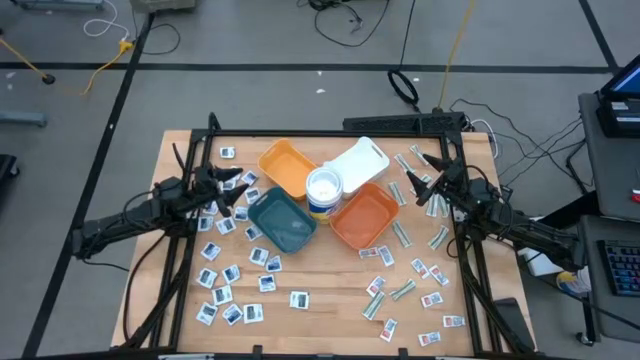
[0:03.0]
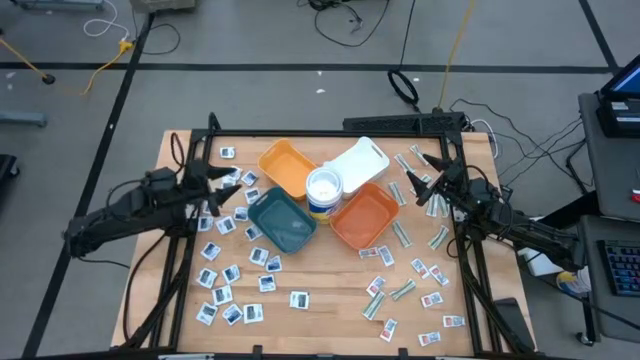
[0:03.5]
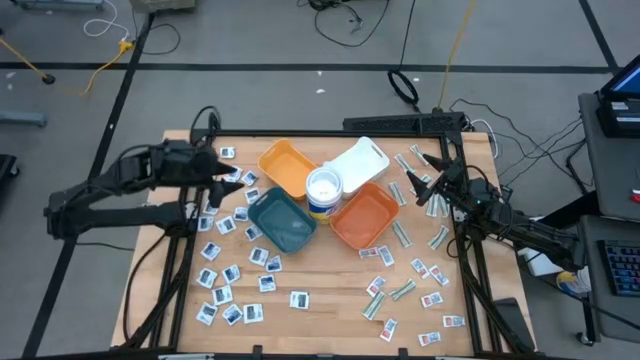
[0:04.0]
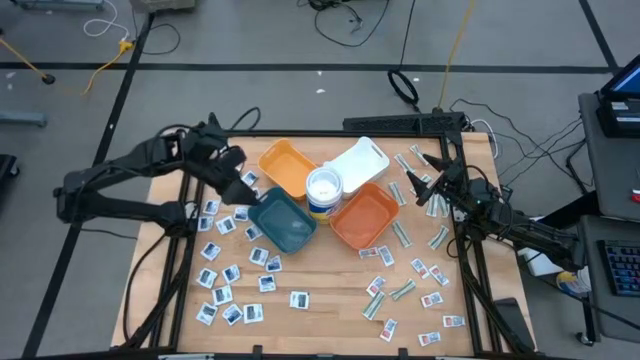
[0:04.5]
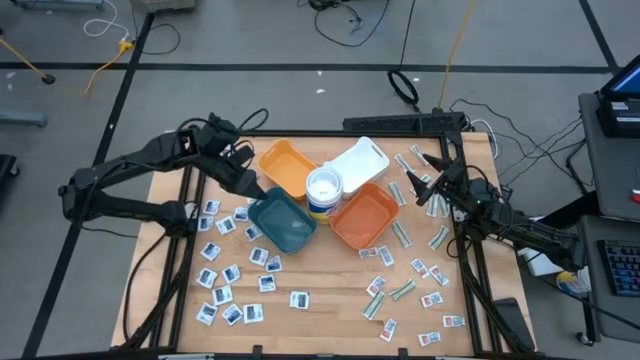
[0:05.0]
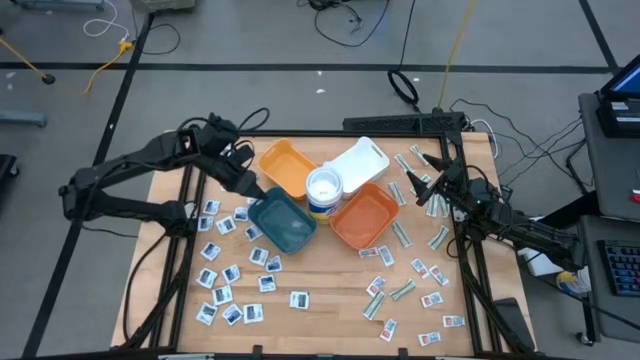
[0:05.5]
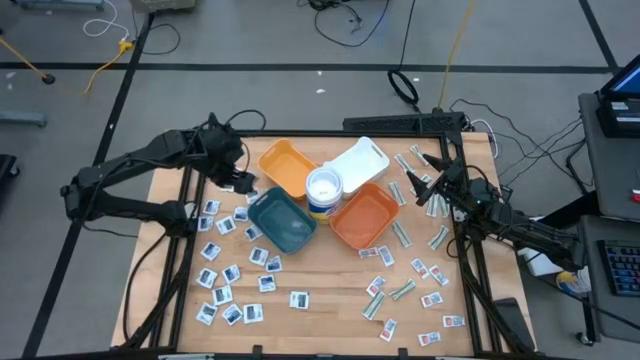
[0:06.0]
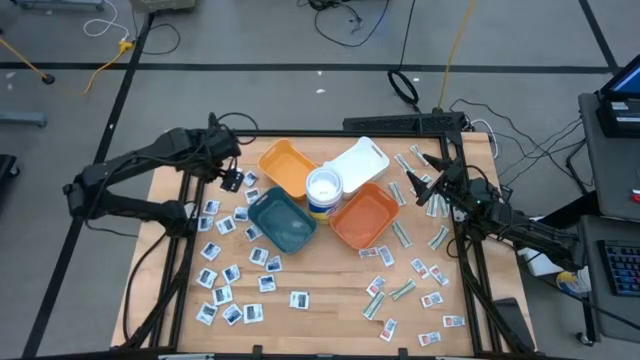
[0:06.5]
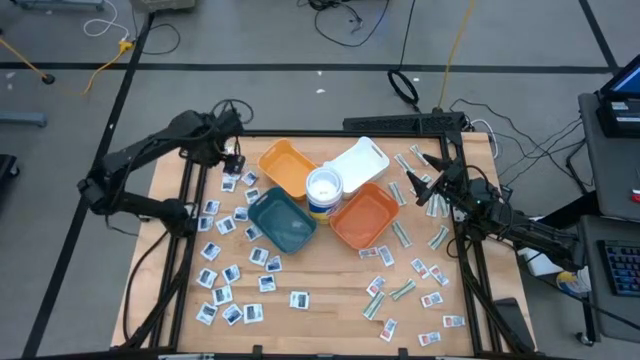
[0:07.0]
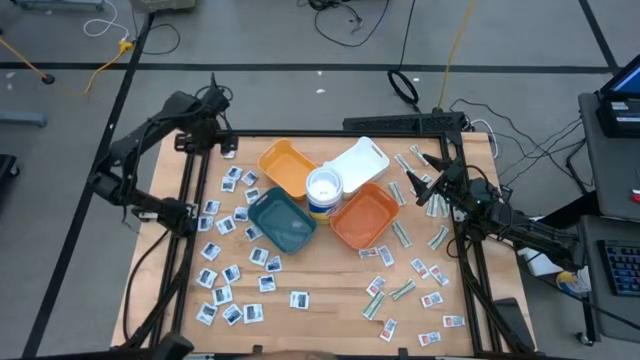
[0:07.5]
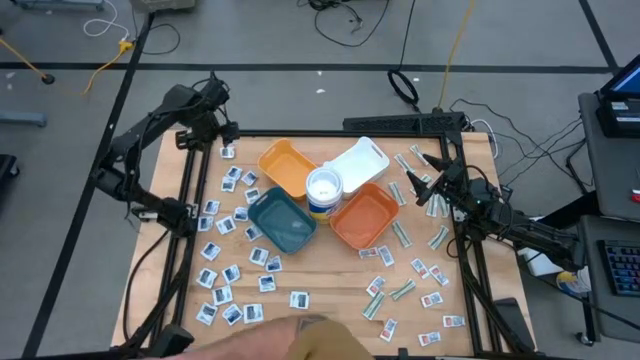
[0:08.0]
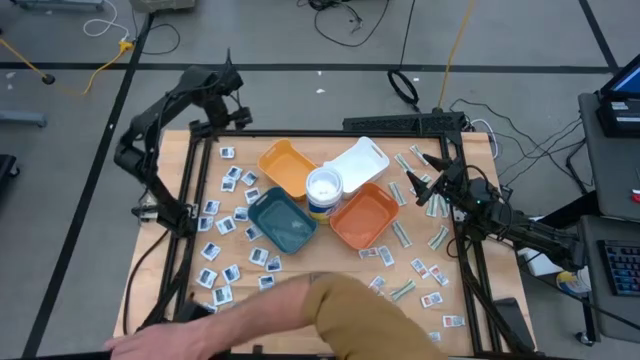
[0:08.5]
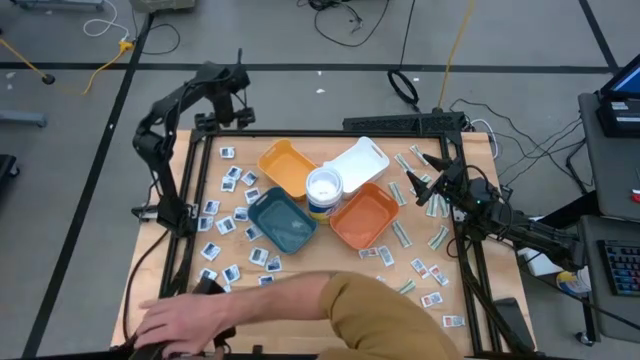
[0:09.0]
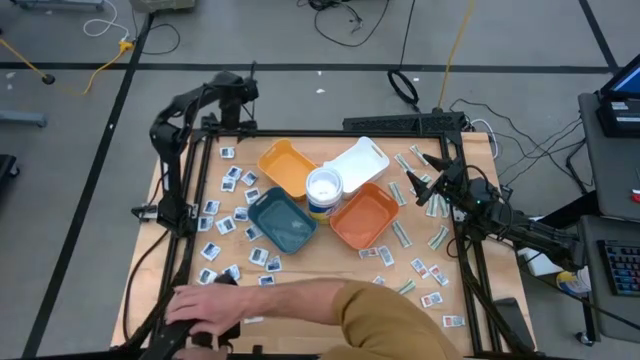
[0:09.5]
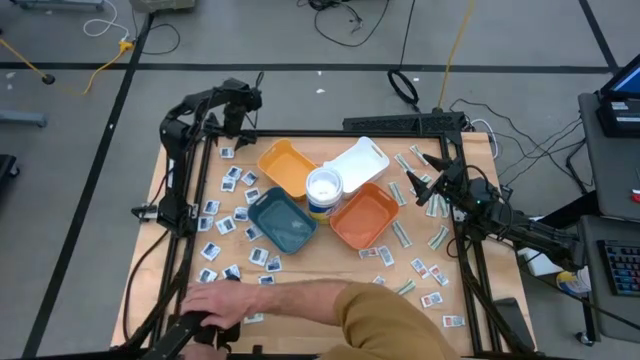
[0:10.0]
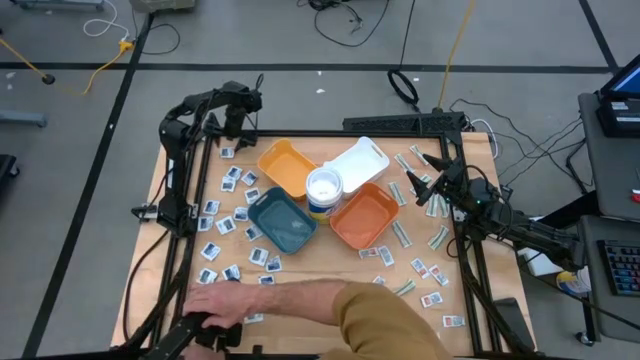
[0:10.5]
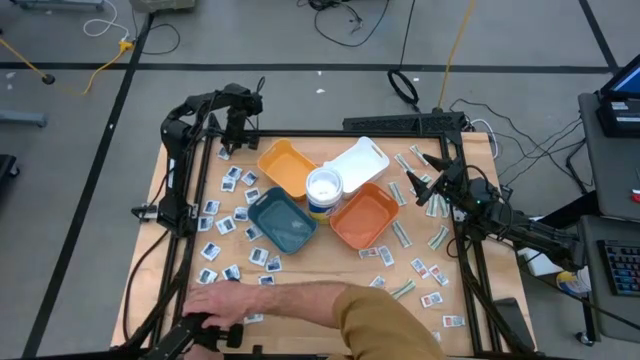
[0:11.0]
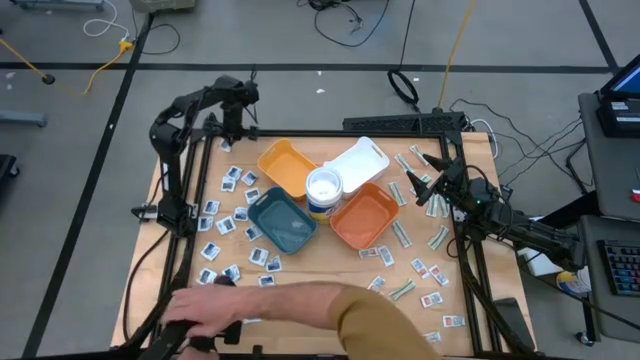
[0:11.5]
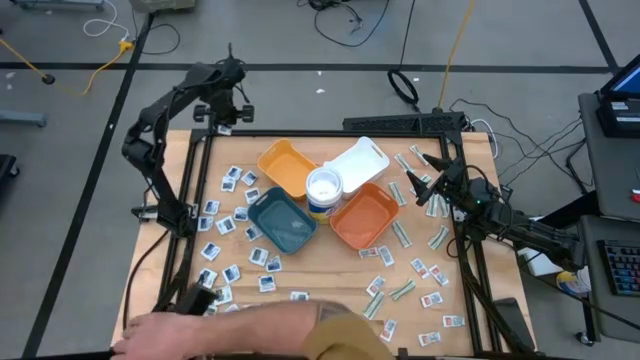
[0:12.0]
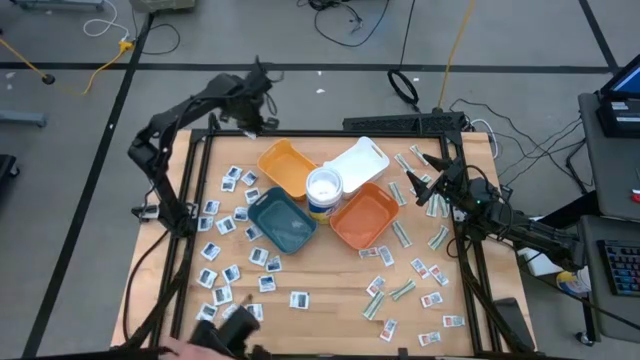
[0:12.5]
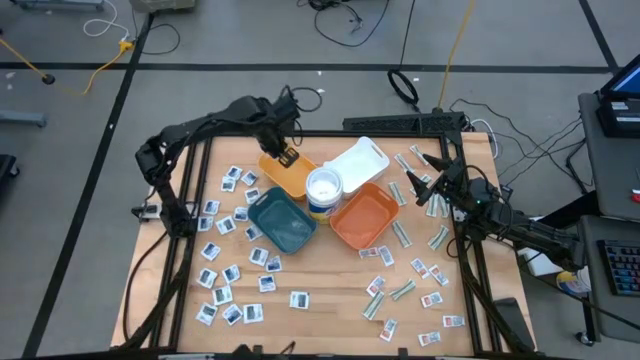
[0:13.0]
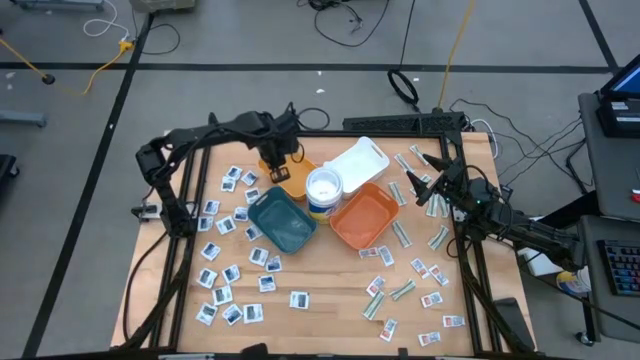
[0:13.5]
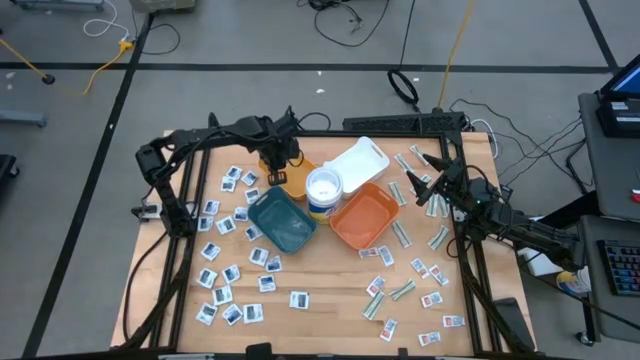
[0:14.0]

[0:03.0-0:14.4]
Task: Pick & Place First Aid Supplies
Put the black pad into the yellow bin

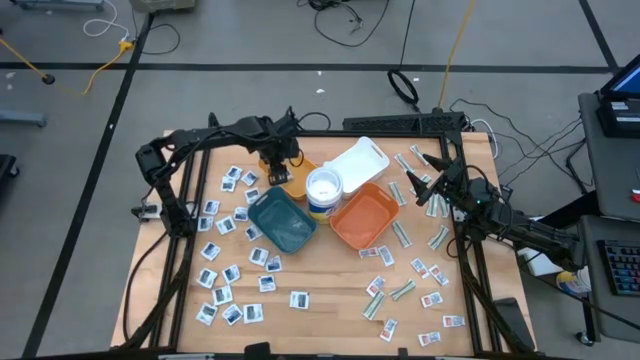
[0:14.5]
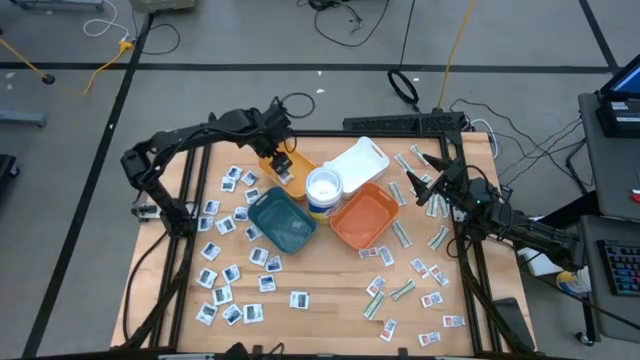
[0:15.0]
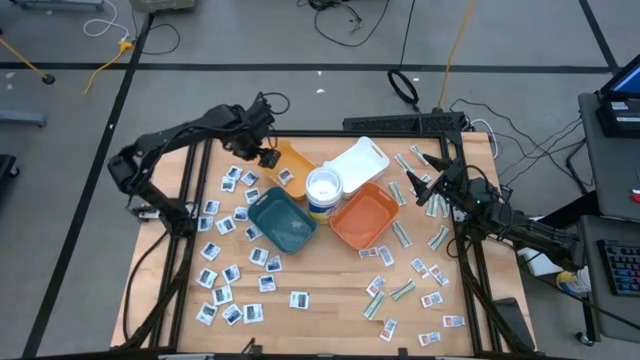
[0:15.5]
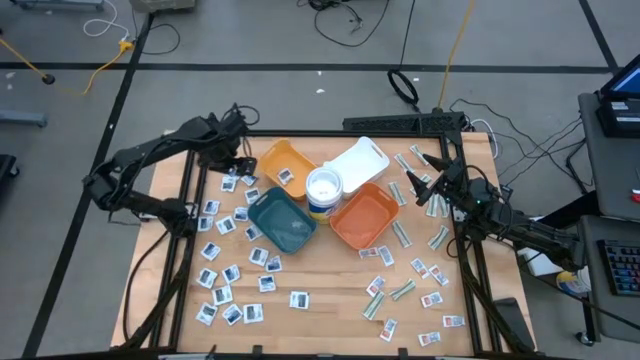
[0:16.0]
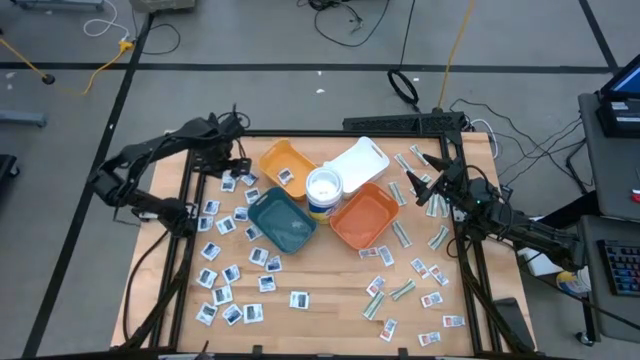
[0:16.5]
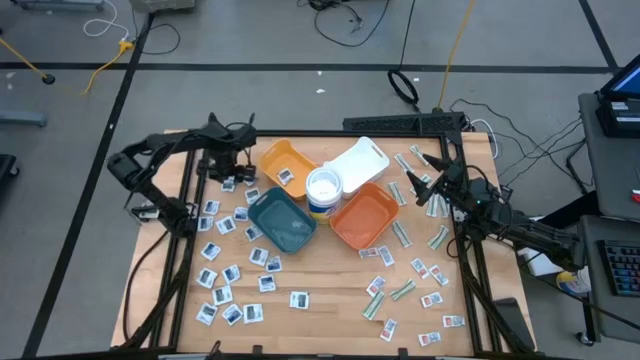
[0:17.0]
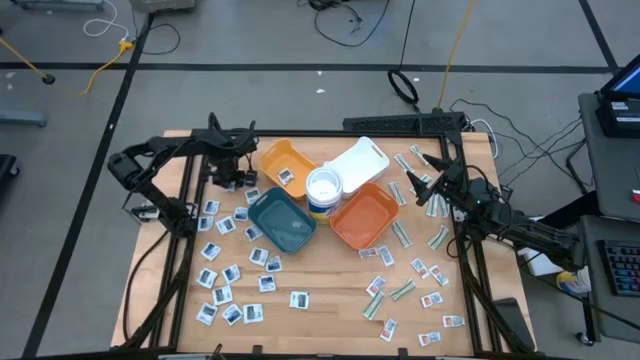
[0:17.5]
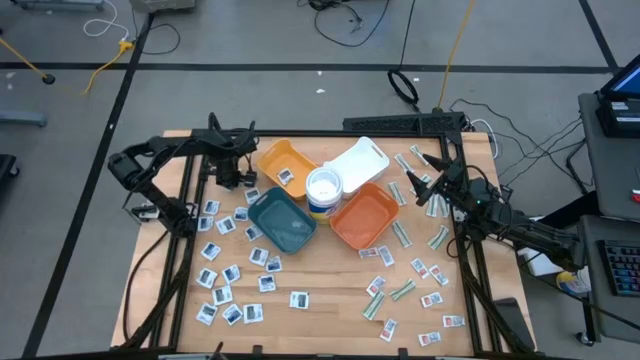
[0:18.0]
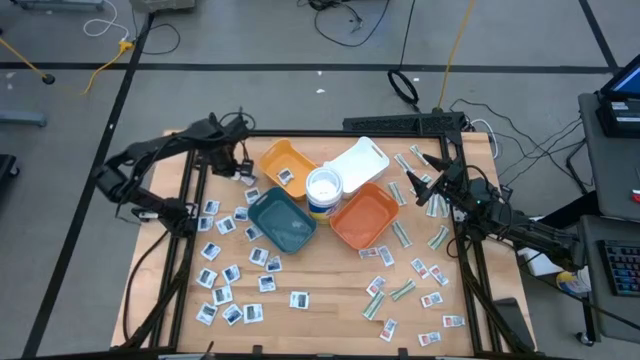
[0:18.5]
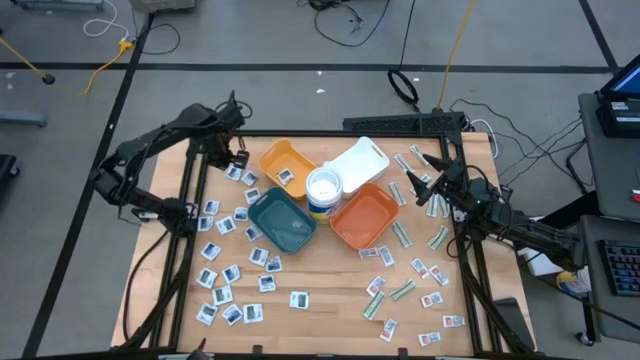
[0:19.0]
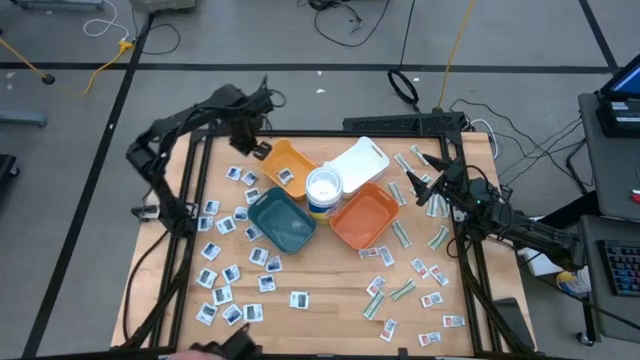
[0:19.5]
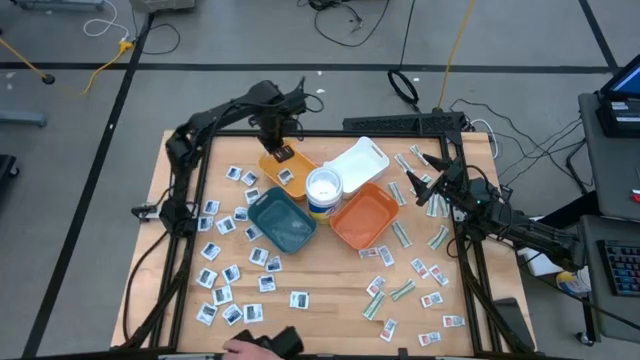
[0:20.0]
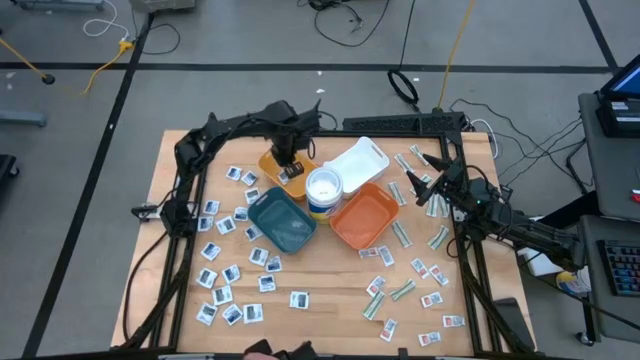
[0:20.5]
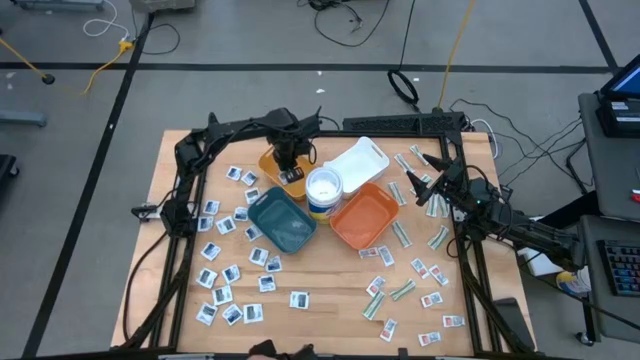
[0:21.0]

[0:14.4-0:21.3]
Put the black pad into the yellow bin

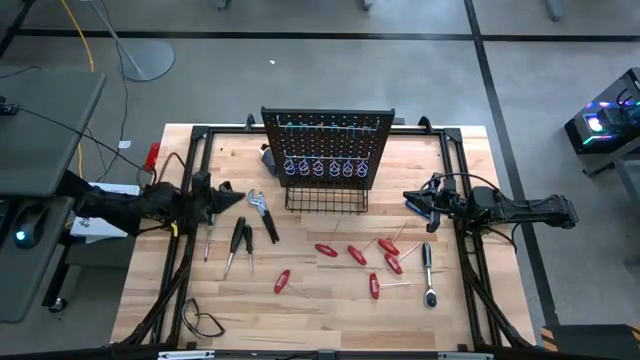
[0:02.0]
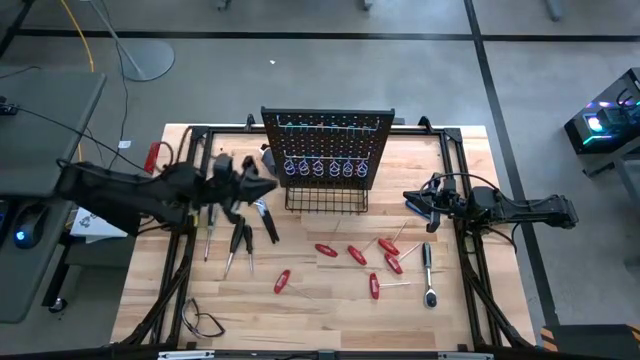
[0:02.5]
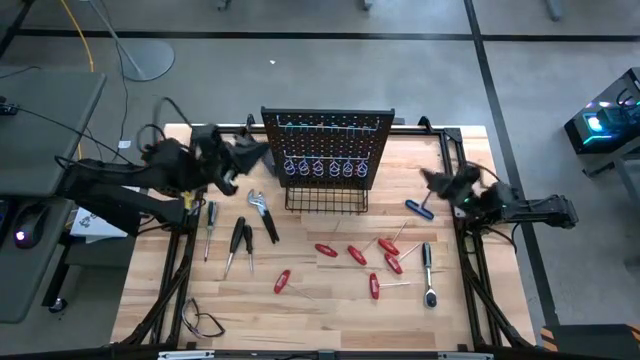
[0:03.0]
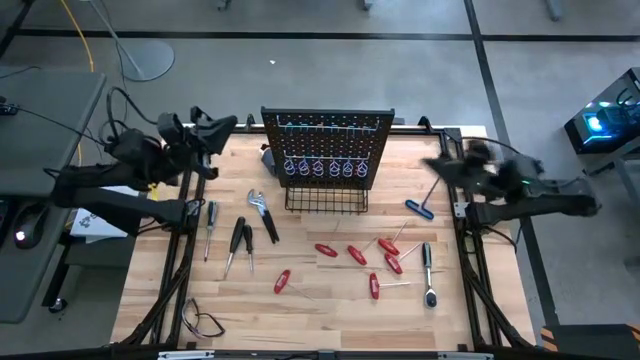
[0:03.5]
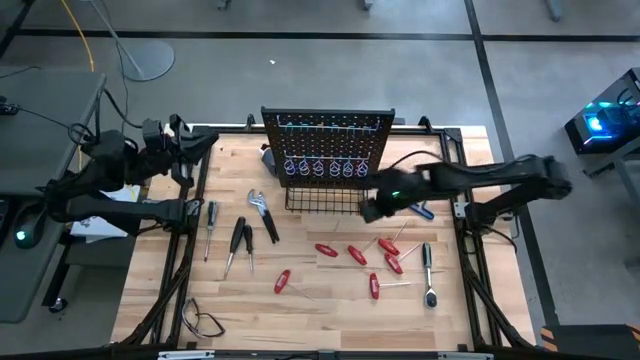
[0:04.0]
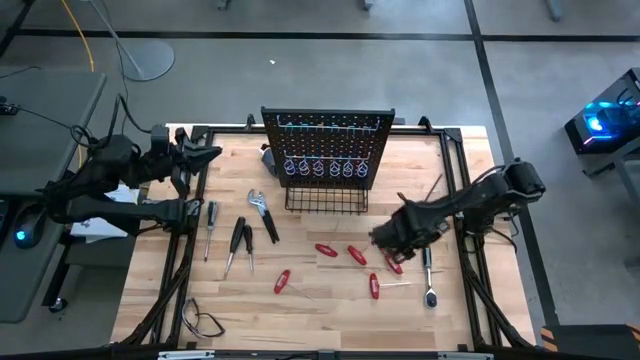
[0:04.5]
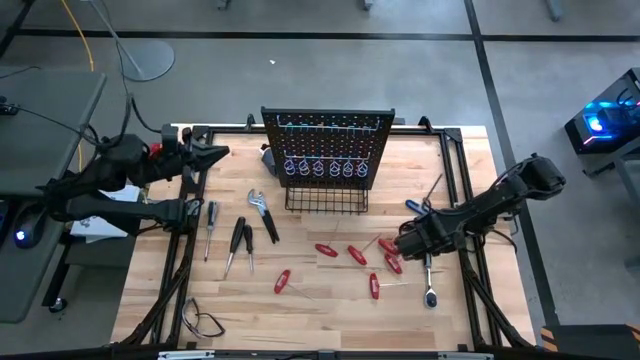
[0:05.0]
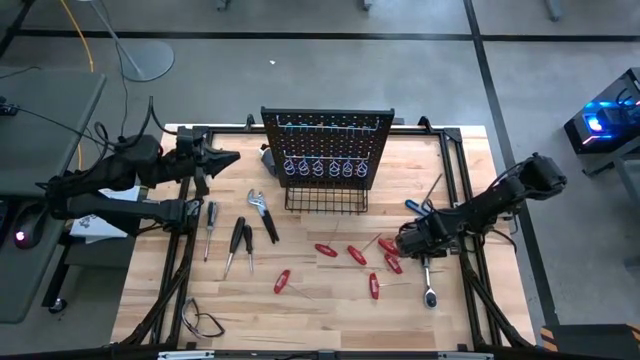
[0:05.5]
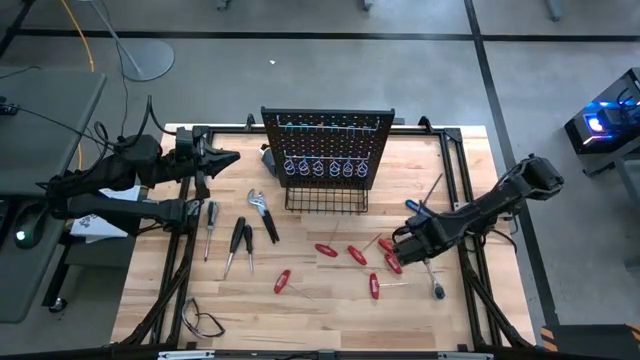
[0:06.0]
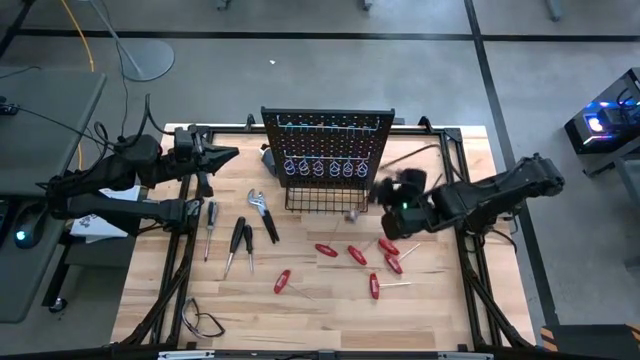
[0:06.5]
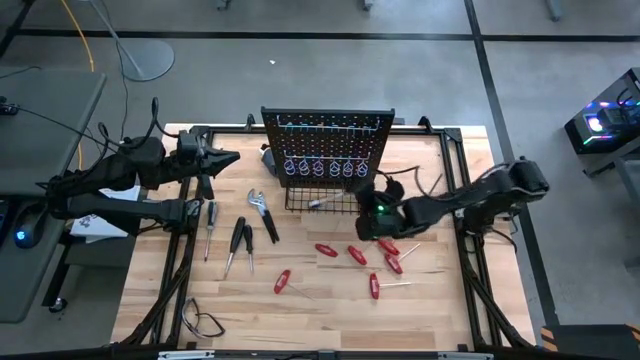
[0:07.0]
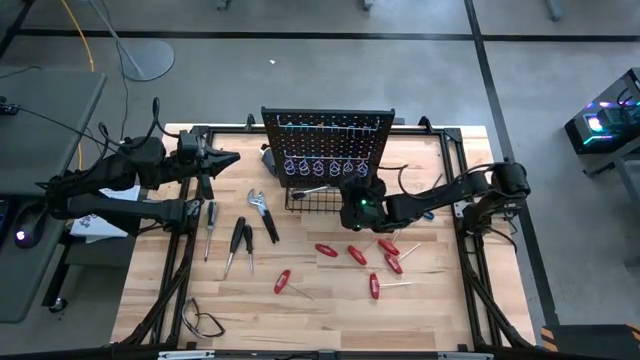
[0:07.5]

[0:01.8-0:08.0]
Task: Hang tools onto peg board
Put the gray ratchet wrench into the wire basket on the peg board
